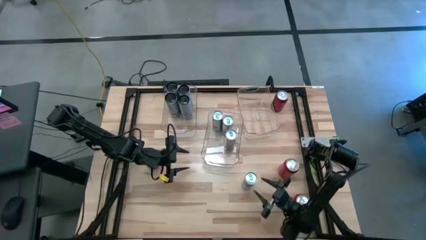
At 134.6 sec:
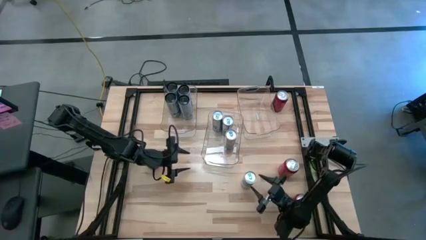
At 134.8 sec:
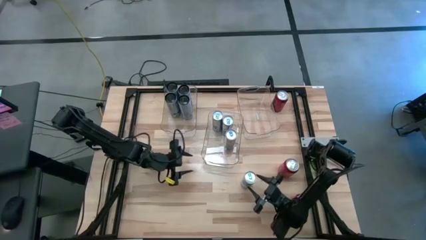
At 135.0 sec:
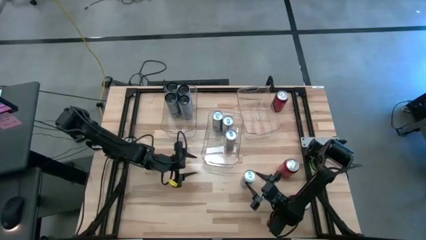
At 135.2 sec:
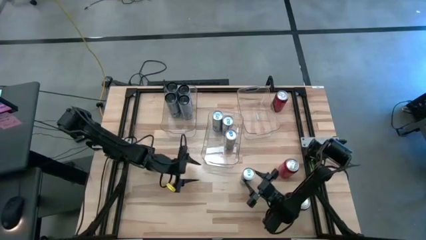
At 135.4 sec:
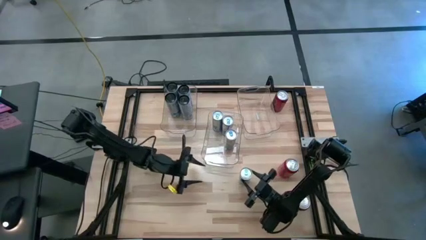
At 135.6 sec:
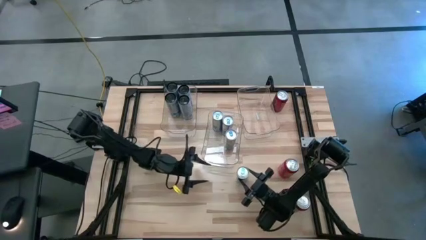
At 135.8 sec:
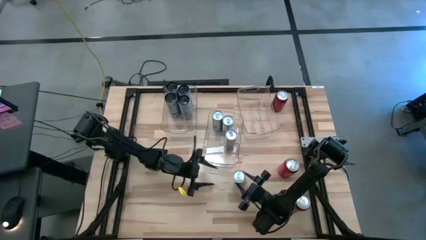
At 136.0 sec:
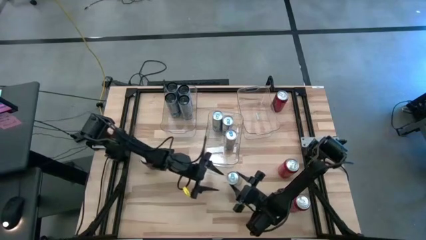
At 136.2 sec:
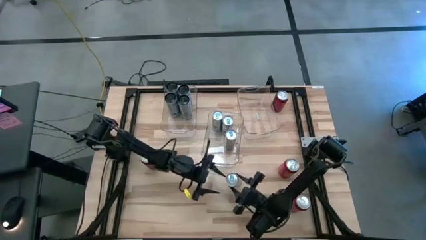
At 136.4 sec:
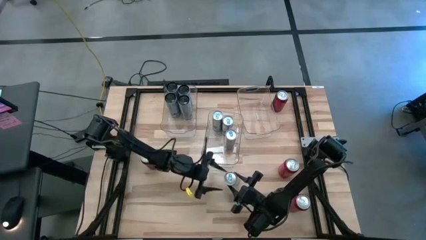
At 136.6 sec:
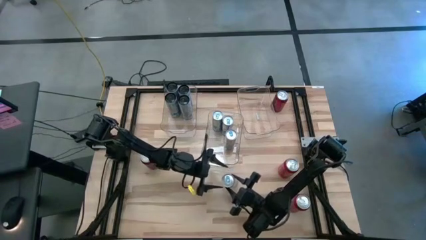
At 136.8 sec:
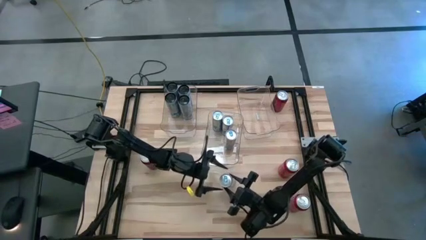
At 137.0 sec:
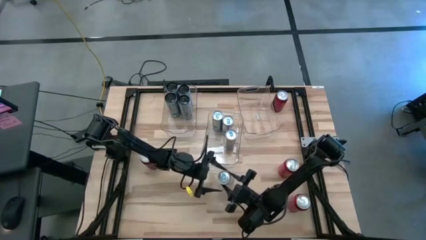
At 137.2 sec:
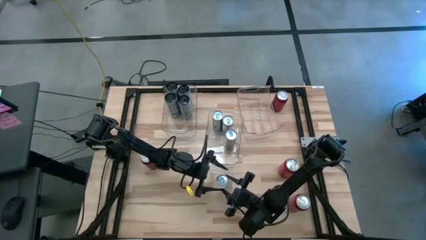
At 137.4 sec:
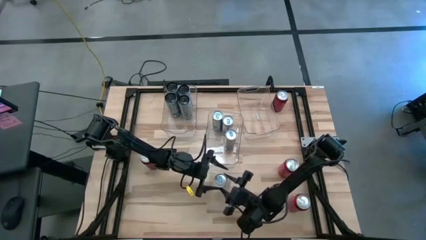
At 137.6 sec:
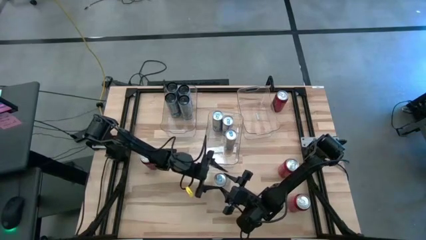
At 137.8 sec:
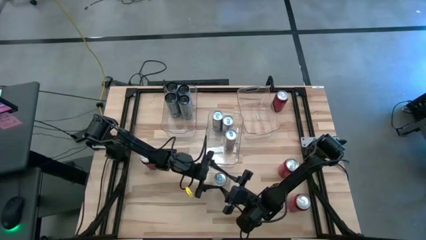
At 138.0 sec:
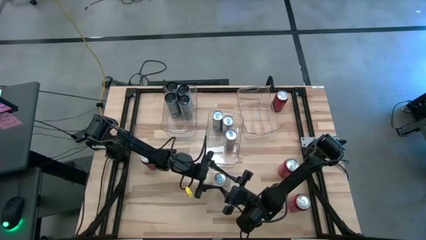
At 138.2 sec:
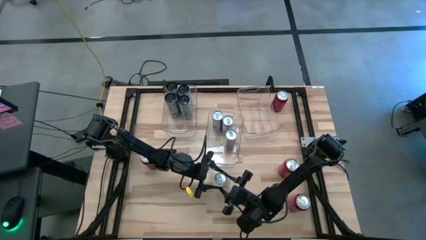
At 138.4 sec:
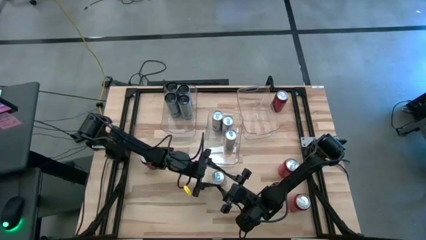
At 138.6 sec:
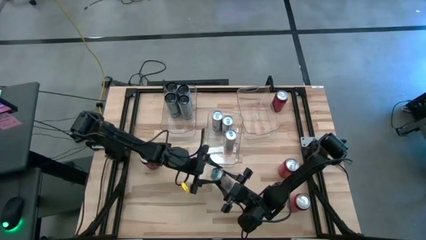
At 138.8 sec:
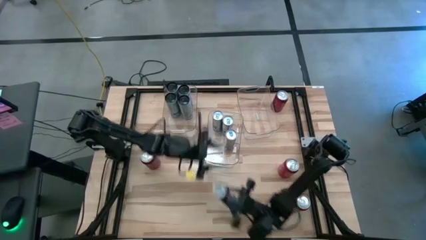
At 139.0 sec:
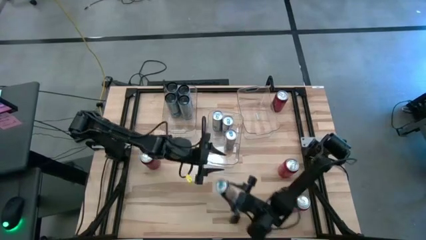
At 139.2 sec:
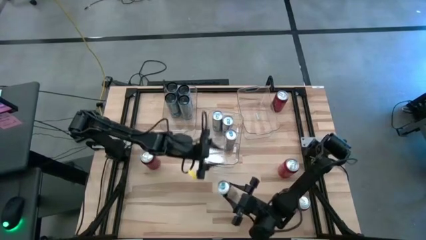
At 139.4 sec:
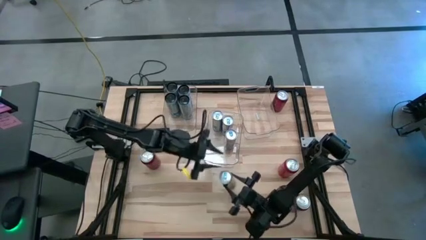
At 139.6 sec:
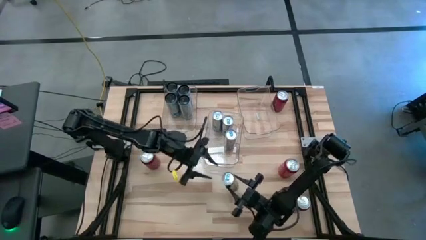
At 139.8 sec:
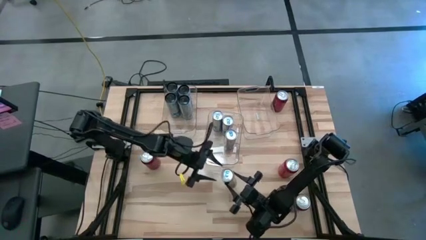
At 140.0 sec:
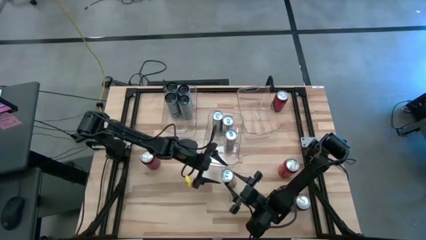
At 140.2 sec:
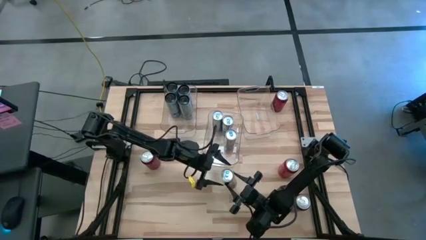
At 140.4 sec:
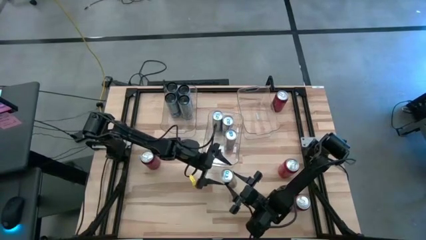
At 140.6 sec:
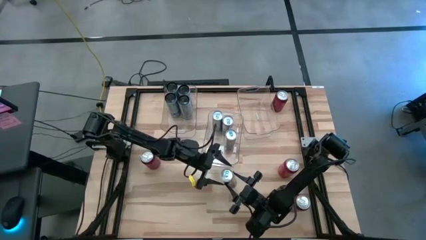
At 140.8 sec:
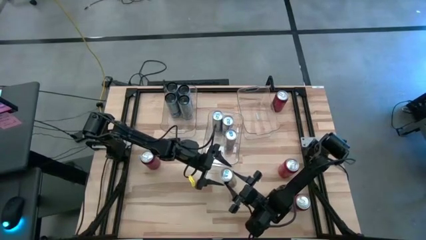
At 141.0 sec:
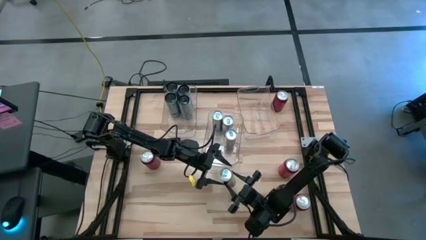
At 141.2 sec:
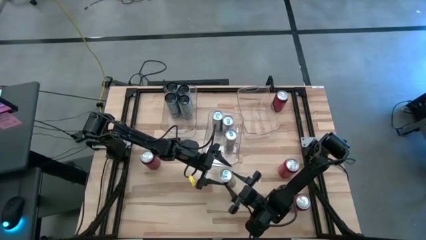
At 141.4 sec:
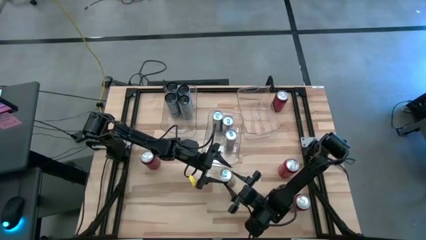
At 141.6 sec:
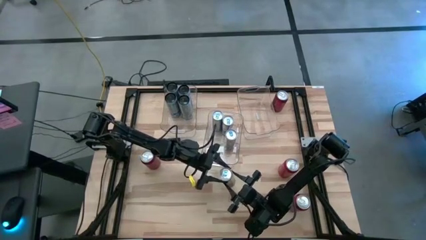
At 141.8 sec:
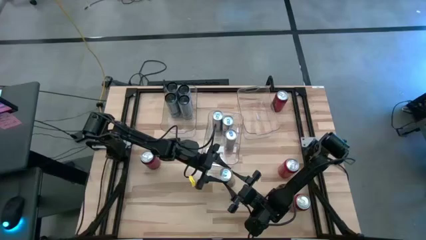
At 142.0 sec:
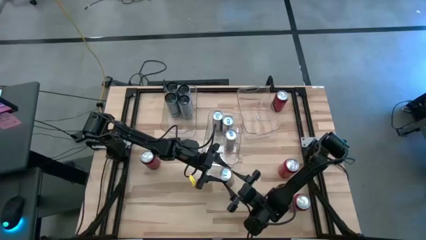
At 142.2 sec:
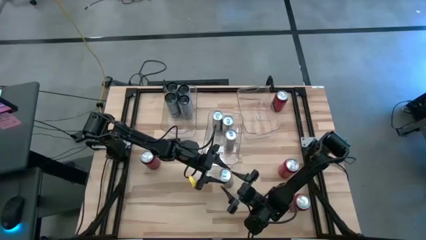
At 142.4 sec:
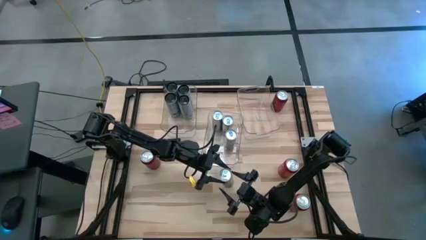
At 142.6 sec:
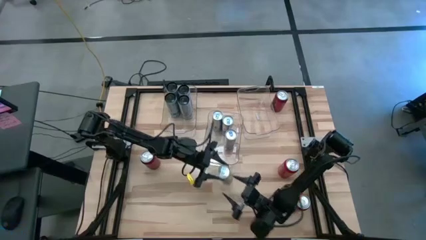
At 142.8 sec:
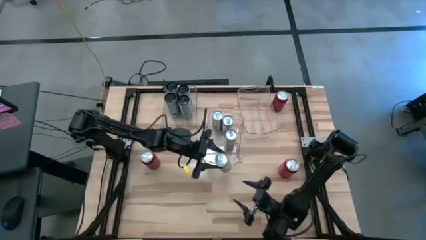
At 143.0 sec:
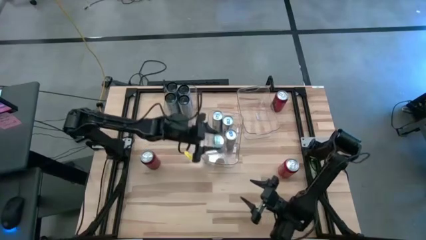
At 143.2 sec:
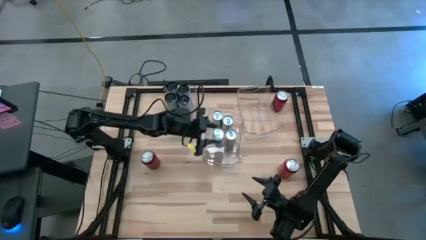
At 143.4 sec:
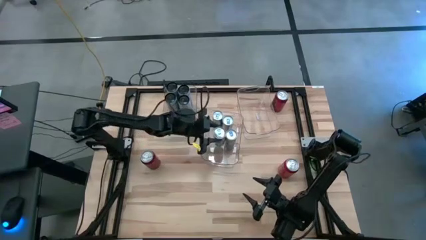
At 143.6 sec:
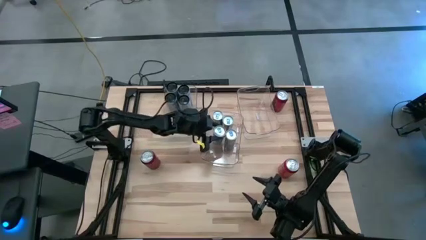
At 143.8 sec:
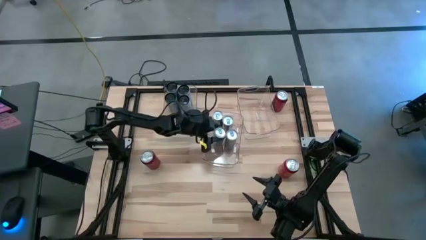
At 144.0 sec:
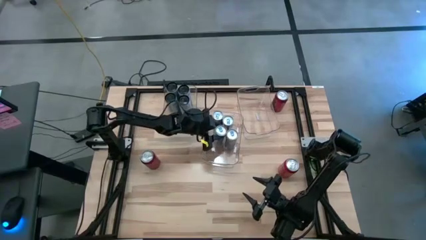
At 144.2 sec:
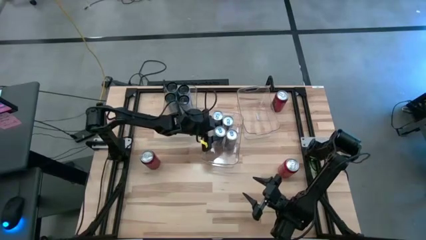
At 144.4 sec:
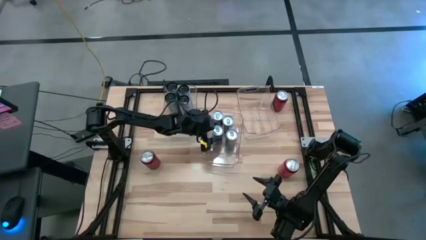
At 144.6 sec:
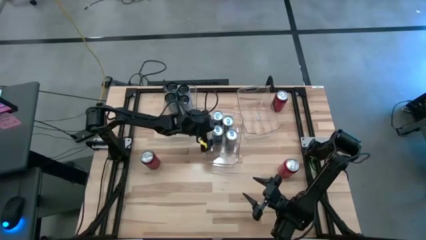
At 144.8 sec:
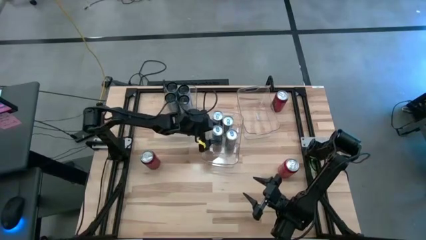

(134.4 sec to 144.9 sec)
Task: Sort soda cans
Put the blue soda can into the middle transparent bin

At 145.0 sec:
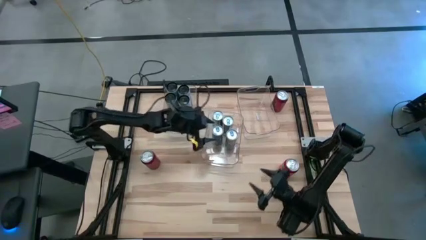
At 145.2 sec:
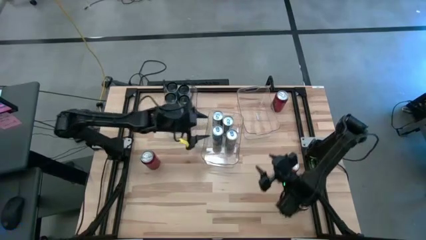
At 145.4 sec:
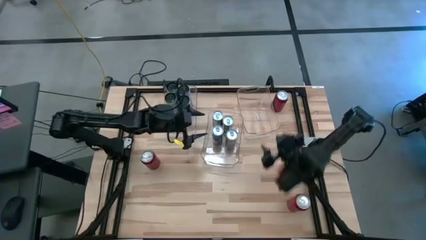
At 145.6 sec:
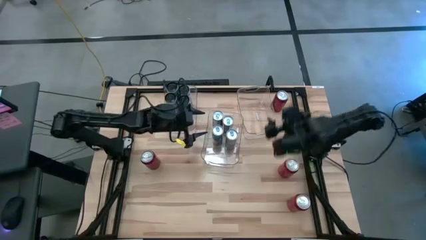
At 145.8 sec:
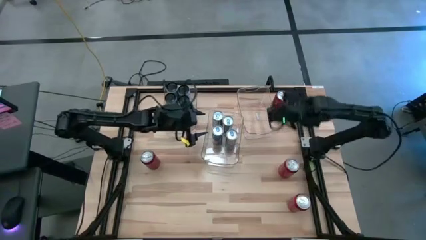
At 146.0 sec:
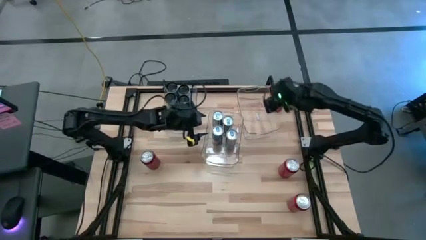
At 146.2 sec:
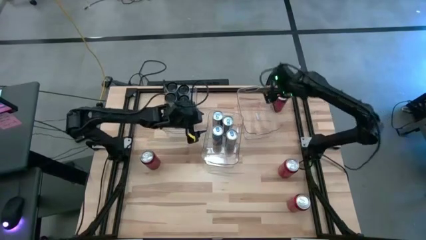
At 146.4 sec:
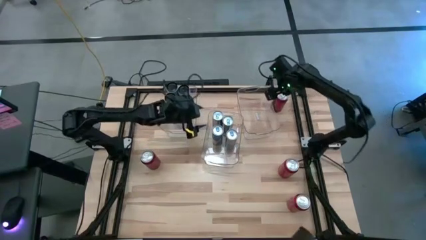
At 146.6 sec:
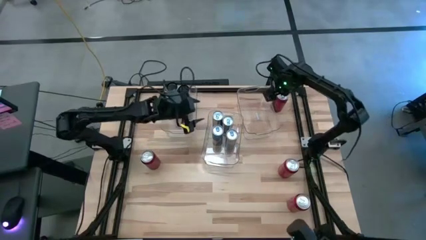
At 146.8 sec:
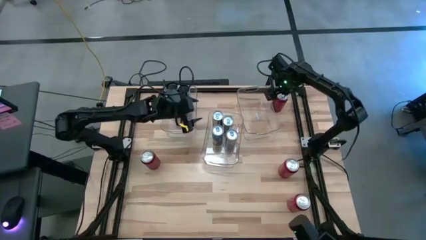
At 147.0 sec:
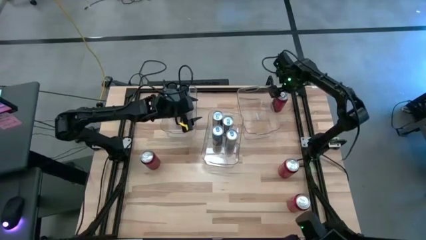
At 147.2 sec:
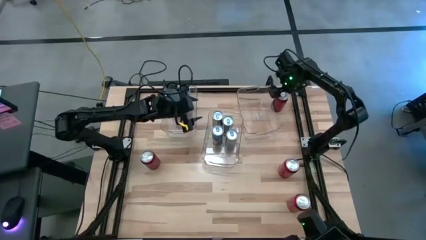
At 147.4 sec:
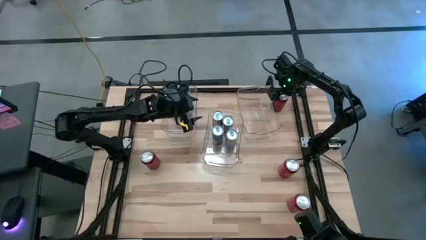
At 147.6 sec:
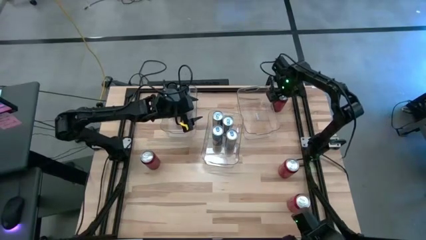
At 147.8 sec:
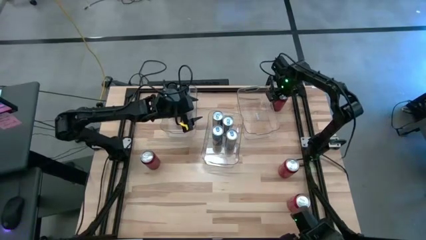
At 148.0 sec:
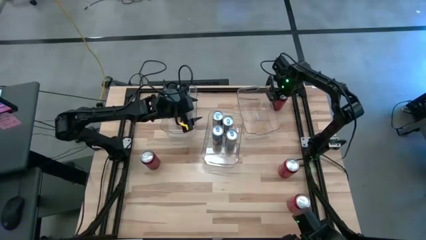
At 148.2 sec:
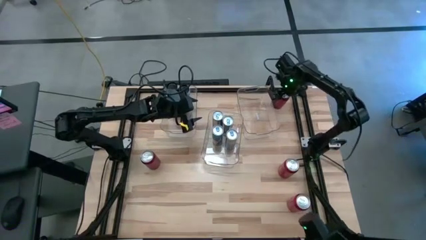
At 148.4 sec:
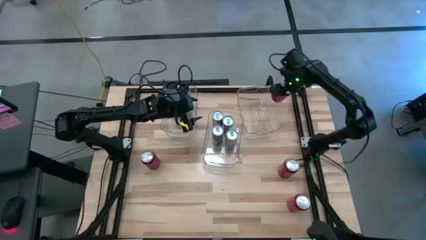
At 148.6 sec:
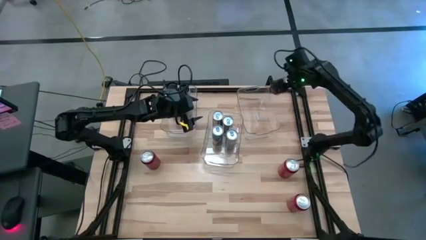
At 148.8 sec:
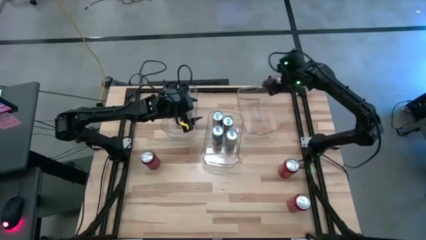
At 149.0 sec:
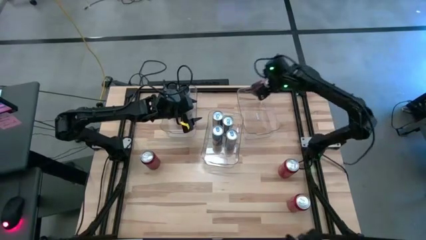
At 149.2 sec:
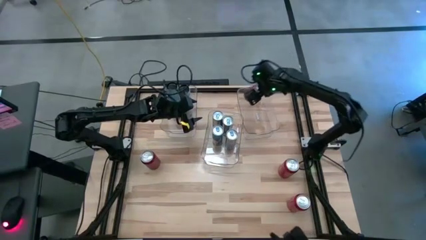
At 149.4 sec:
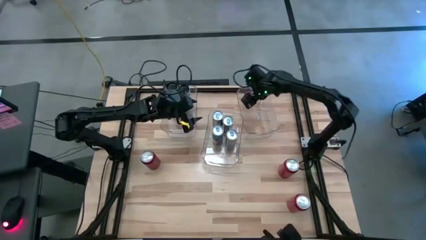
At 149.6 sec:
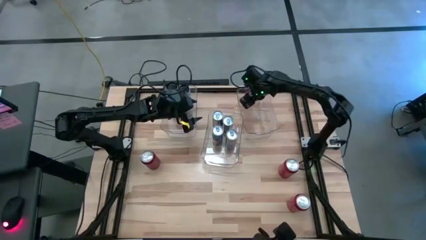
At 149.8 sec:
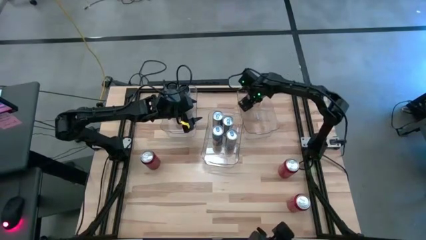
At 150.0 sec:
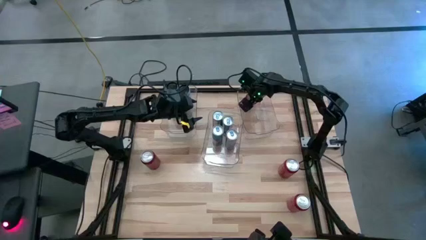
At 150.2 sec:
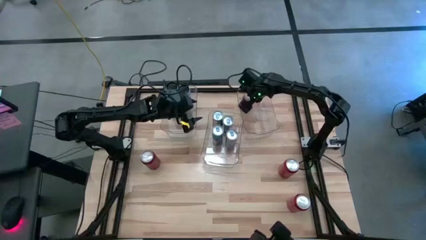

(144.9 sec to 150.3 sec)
Put the red-black soda can into the right transparent bin
